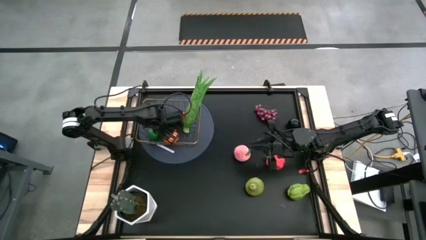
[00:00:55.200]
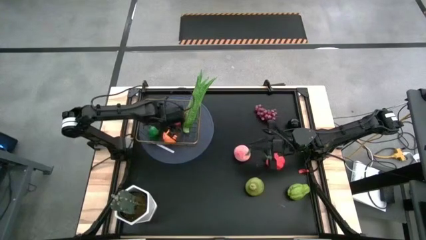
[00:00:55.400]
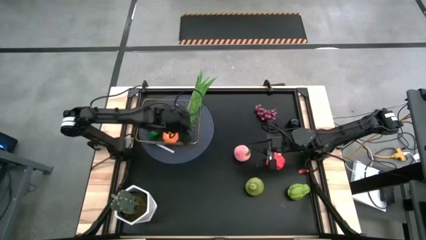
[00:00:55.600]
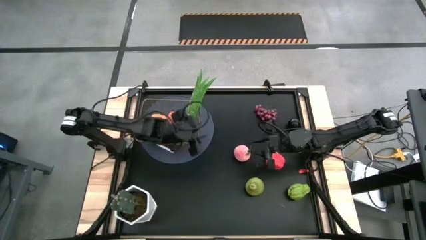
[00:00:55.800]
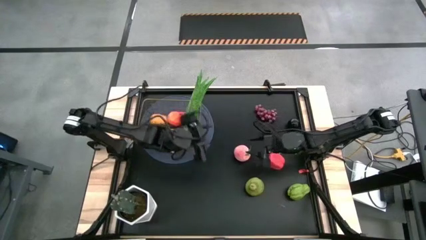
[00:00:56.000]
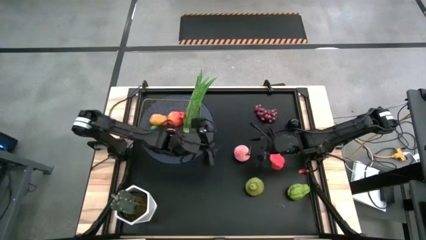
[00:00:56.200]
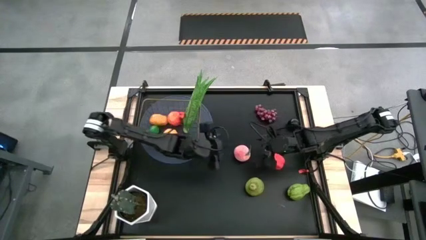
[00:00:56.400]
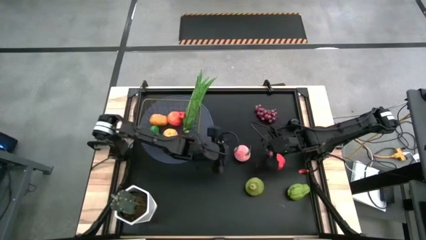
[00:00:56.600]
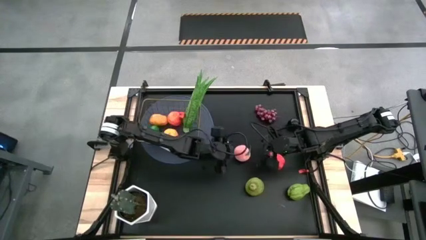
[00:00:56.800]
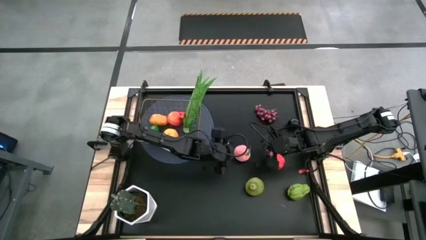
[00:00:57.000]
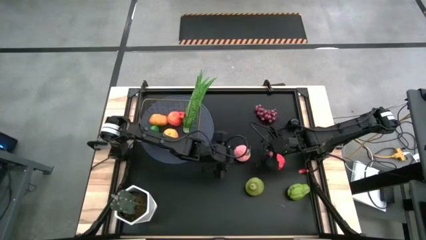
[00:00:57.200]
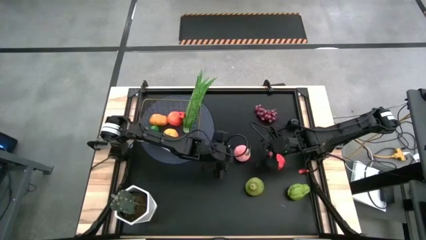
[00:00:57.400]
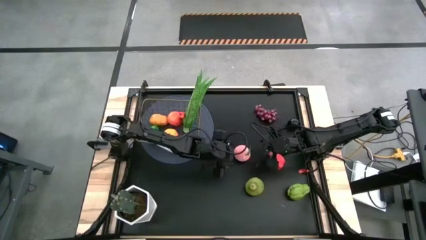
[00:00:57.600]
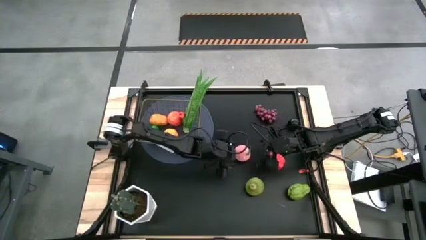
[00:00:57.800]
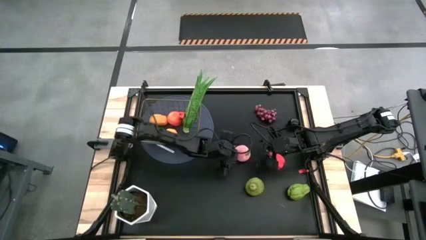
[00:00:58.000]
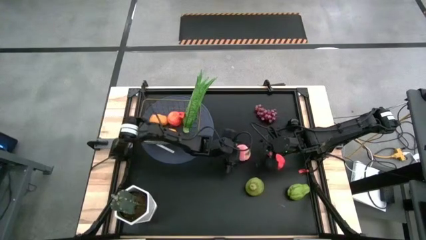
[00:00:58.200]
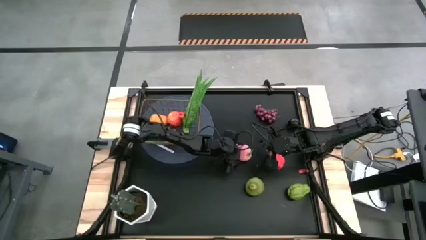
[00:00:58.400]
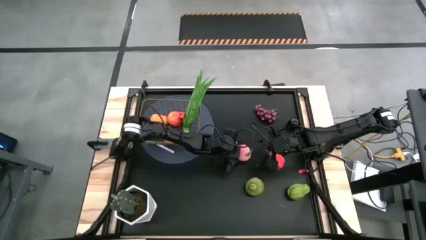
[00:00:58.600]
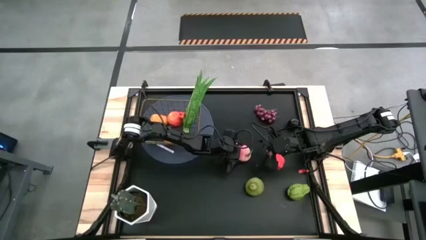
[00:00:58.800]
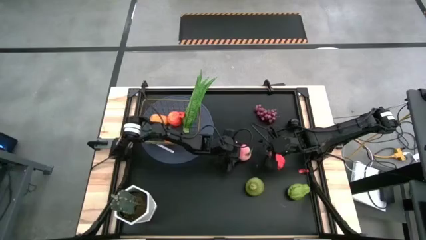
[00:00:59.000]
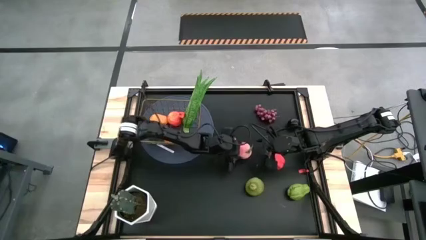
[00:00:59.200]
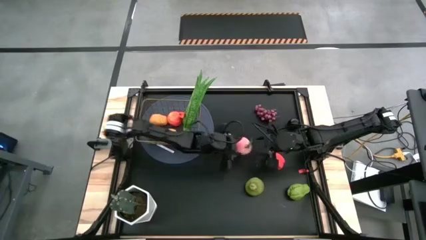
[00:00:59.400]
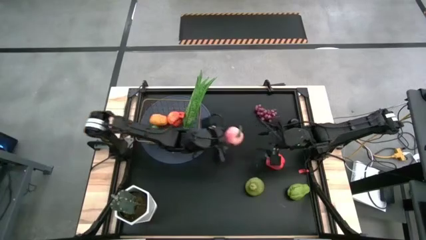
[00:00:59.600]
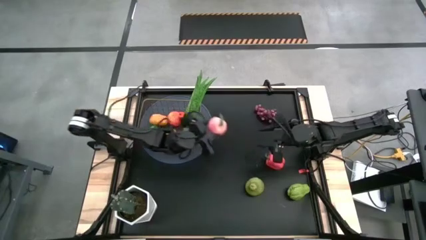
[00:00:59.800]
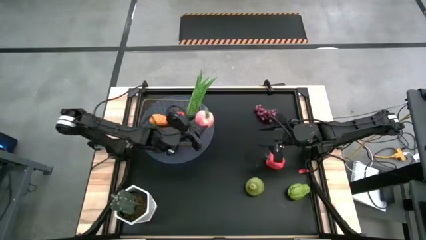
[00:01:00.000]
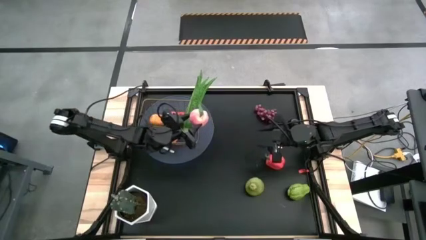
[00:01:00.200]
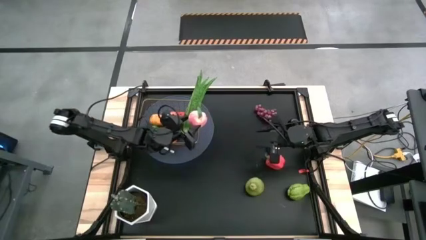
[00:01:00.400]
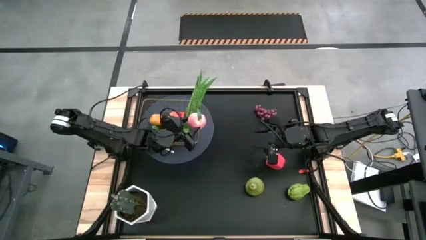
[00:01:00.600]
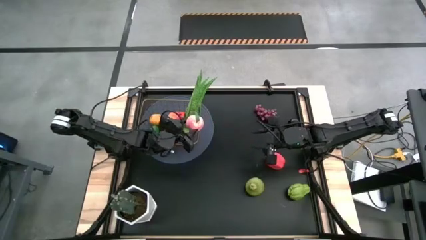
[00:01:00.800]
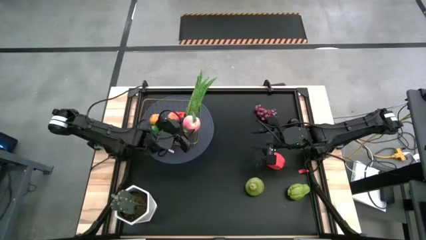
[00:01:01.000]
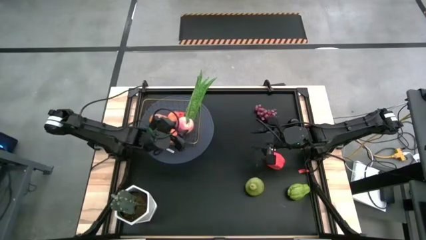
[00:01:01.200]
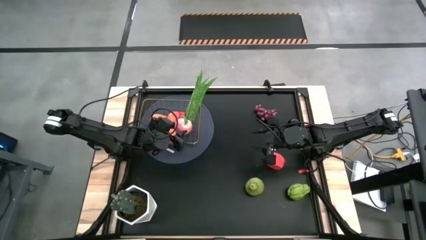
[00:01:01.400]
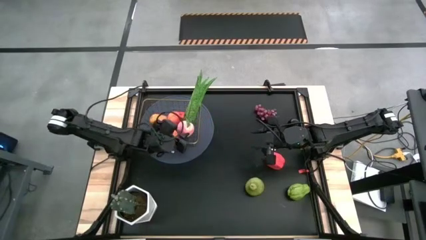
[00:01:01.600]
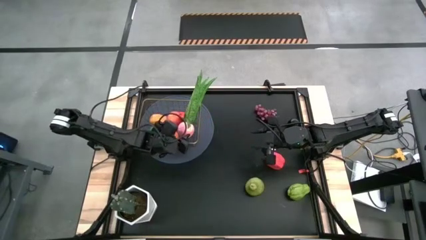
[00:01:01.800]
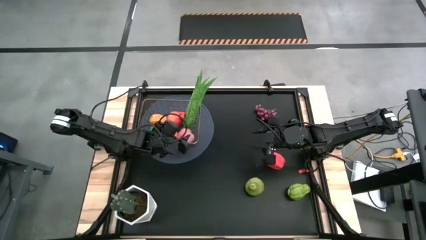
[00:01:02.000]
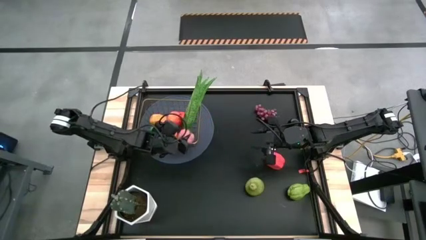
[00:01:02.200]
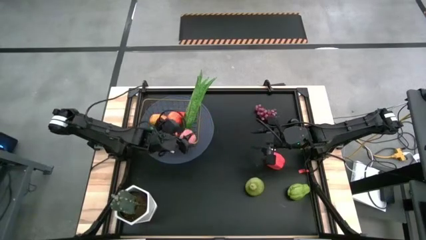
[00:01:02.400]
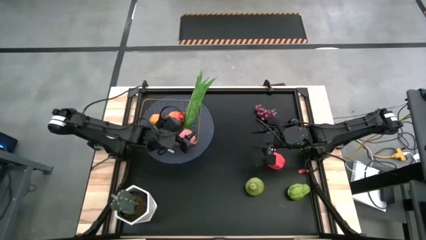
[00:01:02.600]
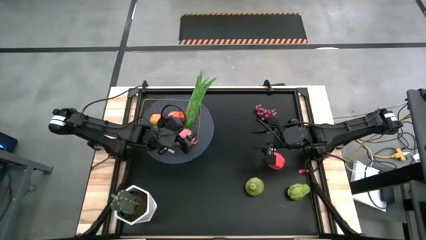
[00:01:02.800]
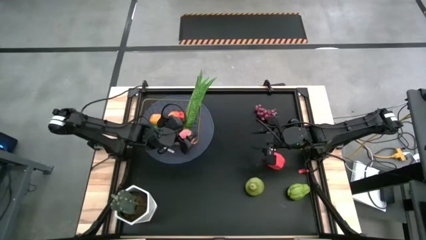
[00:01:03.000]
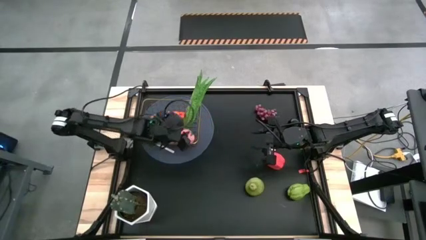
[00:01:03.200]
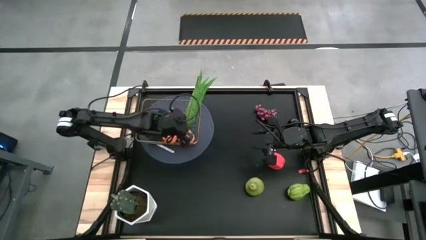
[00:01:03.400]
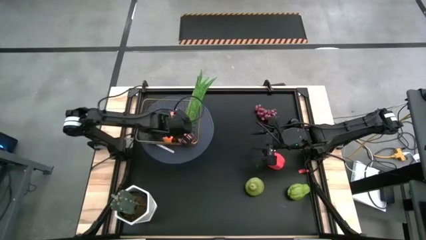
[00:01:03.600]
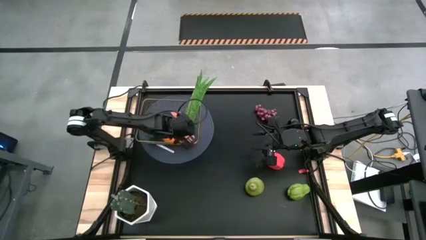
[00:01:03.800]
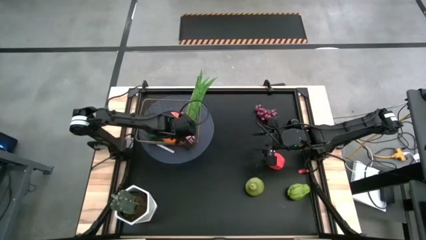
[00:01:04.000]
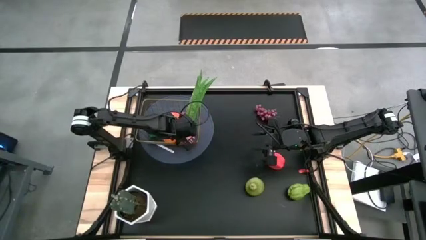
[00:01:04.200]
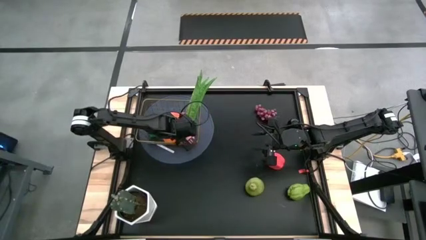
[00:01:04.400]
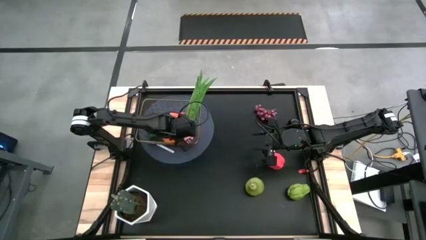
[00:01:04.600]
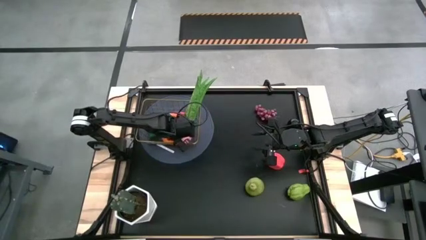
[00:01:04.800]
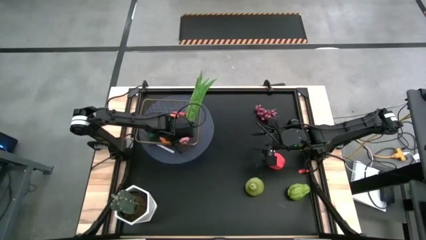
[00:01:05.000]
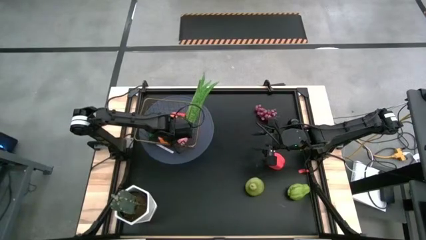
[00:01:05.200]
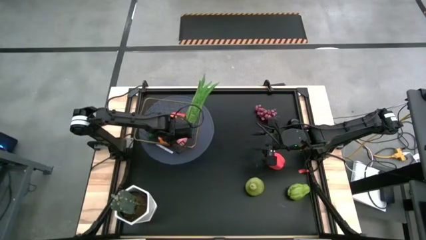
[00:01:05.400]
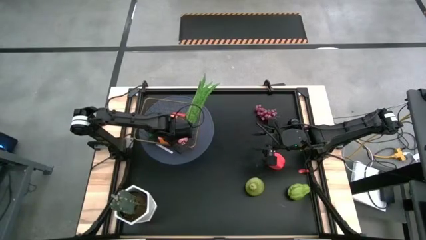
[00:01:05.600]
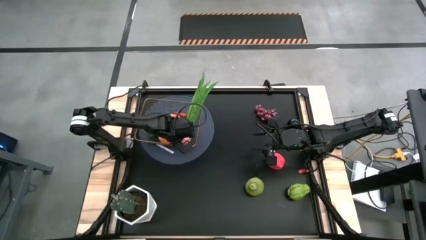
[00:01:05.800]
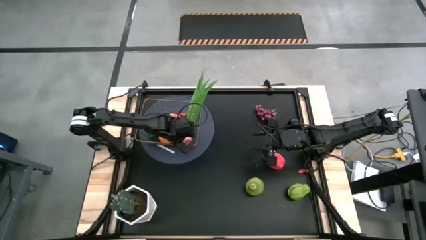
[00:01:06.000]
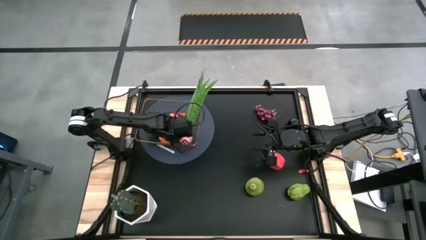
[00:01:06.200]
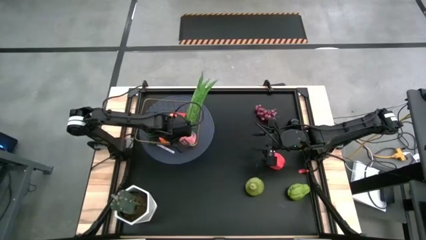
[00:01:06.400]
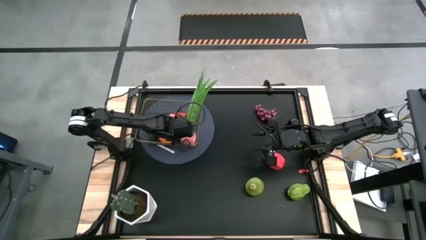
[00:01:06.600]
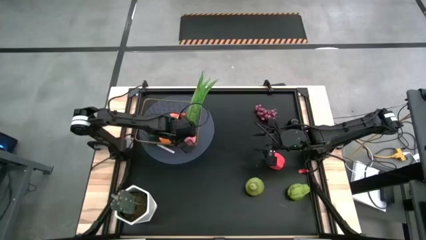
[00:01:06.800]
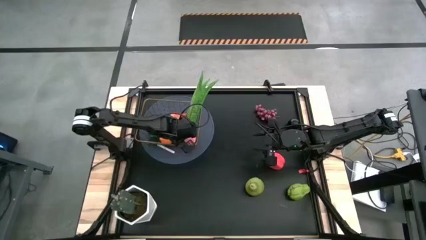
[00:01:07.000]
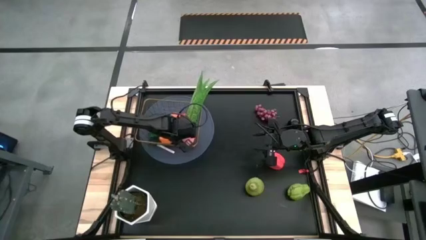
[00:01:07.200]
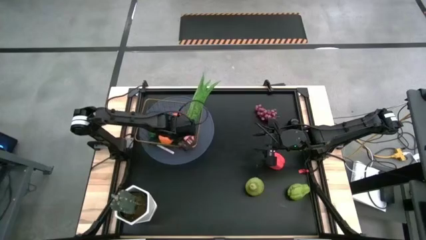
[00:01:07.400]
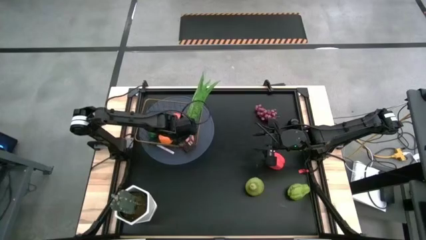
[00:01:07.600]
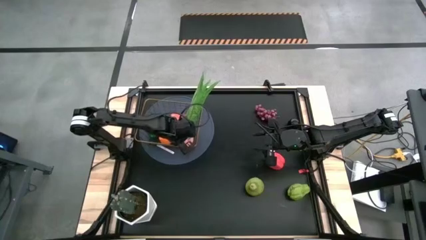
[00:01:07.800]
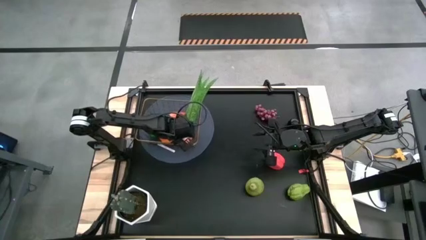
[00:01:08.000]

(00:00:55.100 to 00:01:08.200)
Task: Build produce basket
Put the pink peach into the wire basket
